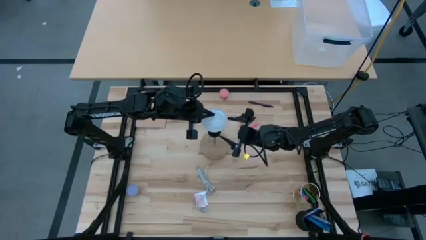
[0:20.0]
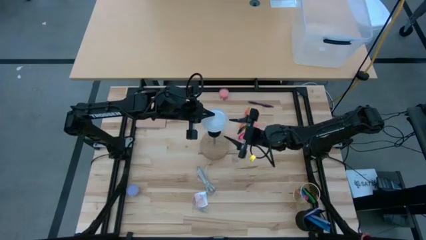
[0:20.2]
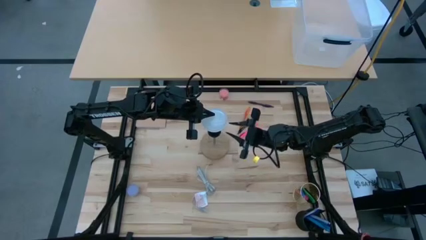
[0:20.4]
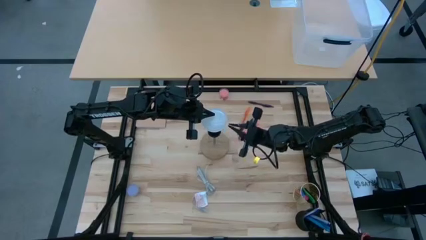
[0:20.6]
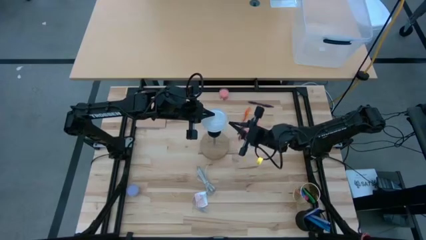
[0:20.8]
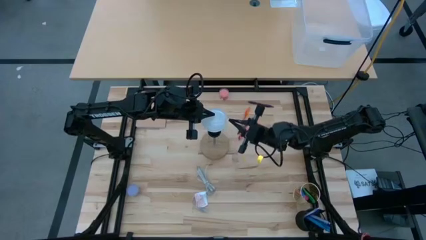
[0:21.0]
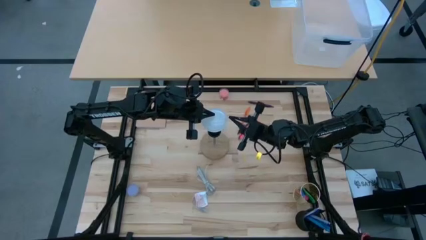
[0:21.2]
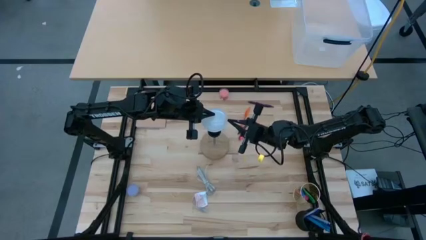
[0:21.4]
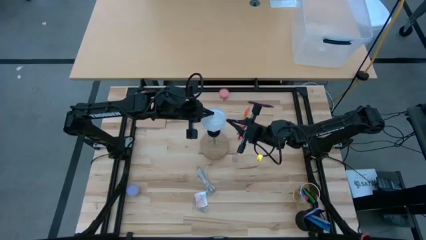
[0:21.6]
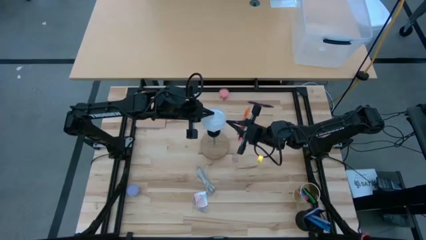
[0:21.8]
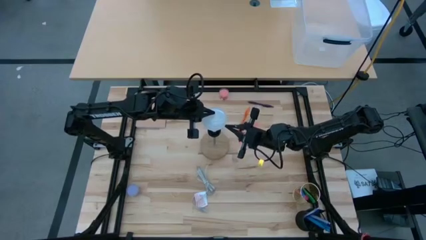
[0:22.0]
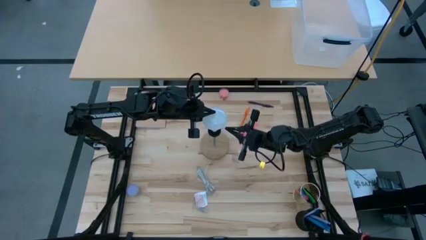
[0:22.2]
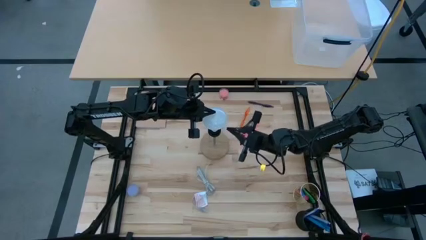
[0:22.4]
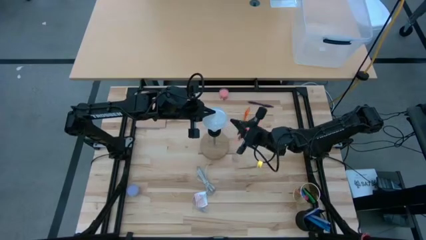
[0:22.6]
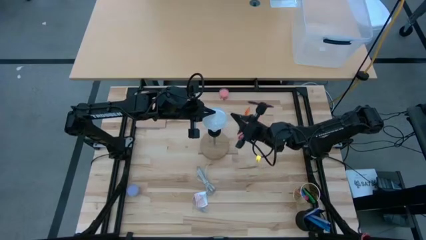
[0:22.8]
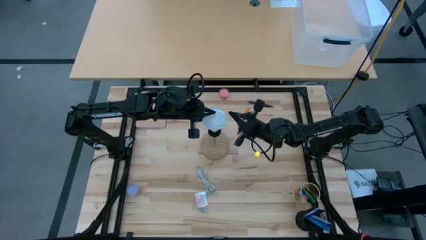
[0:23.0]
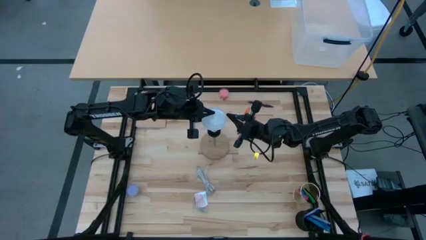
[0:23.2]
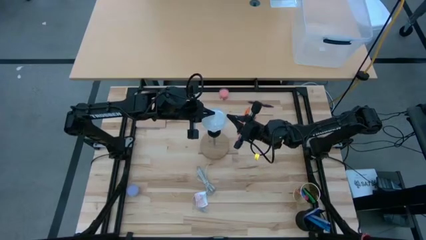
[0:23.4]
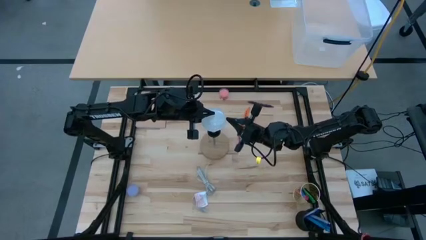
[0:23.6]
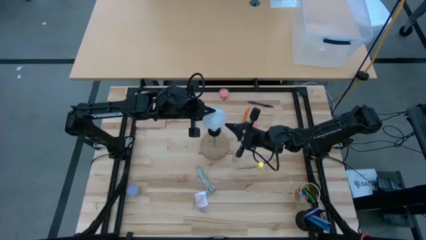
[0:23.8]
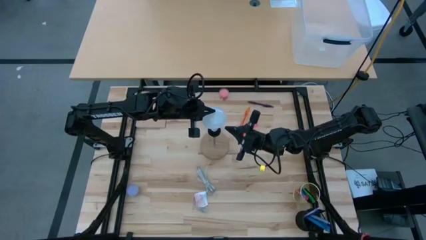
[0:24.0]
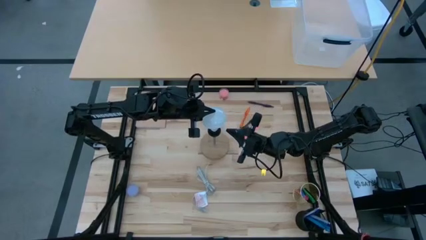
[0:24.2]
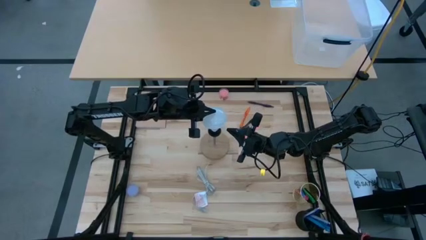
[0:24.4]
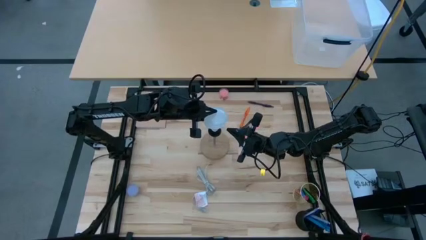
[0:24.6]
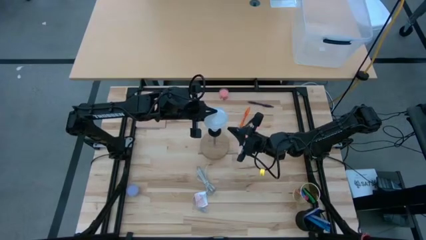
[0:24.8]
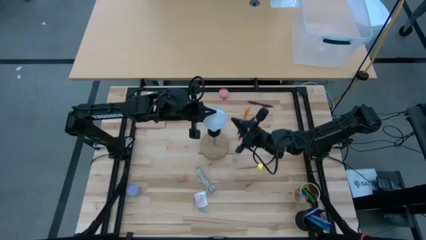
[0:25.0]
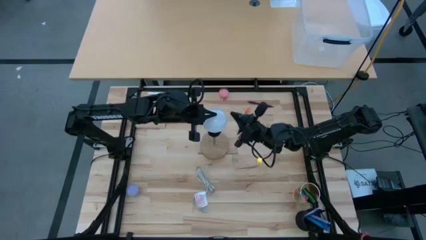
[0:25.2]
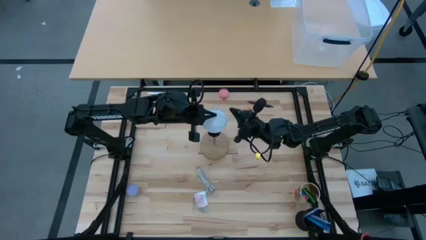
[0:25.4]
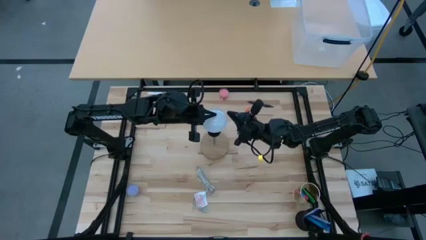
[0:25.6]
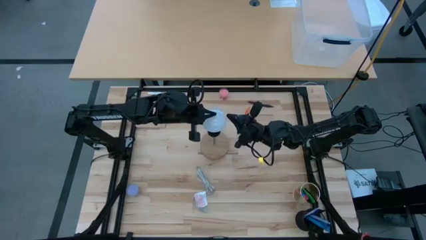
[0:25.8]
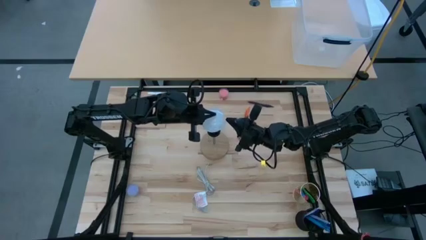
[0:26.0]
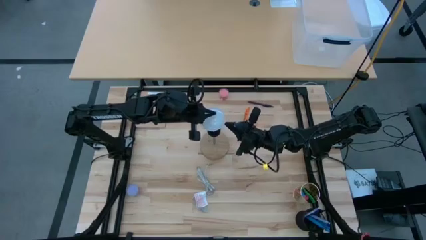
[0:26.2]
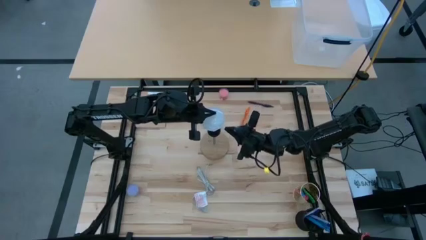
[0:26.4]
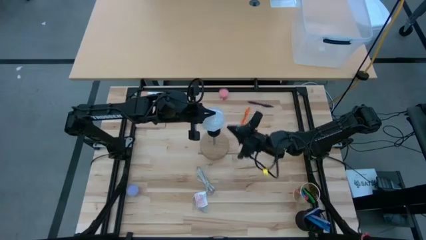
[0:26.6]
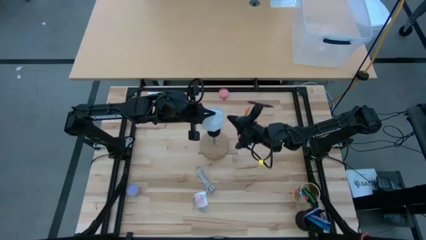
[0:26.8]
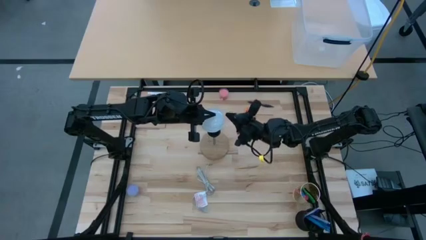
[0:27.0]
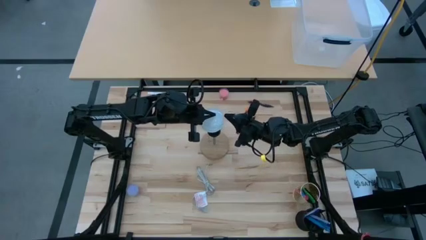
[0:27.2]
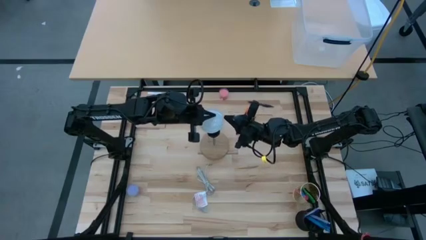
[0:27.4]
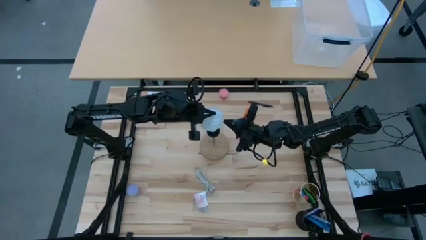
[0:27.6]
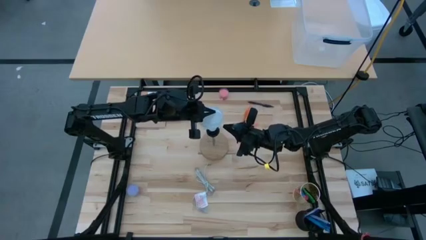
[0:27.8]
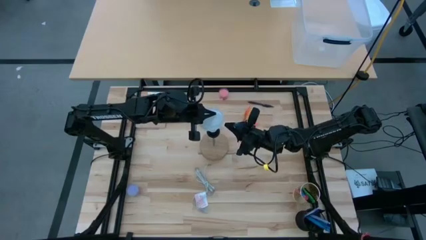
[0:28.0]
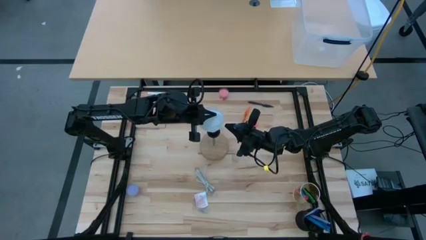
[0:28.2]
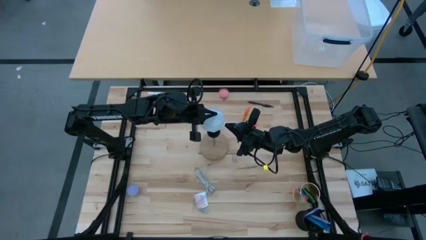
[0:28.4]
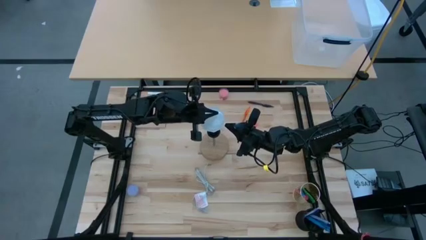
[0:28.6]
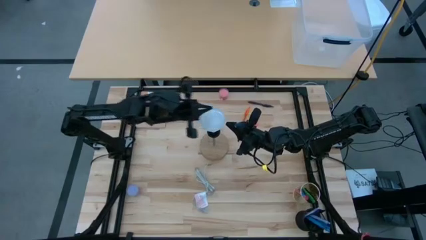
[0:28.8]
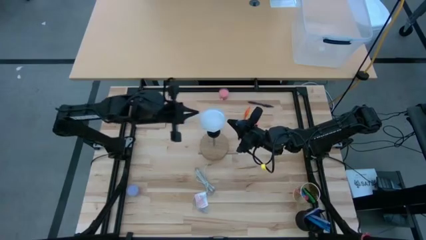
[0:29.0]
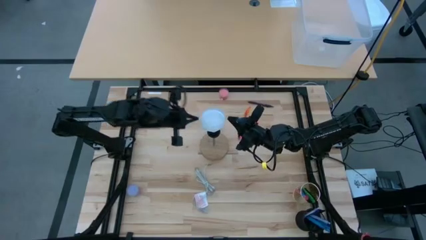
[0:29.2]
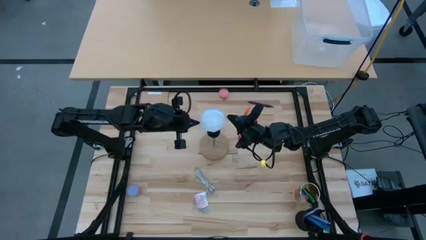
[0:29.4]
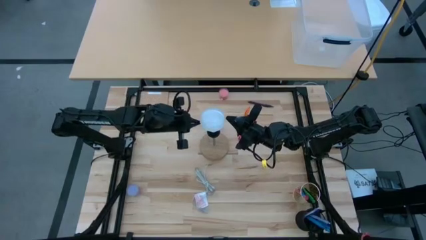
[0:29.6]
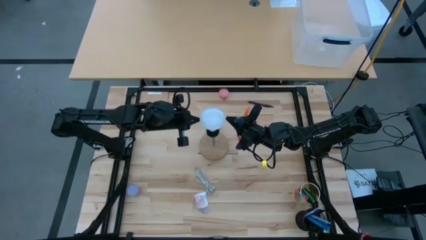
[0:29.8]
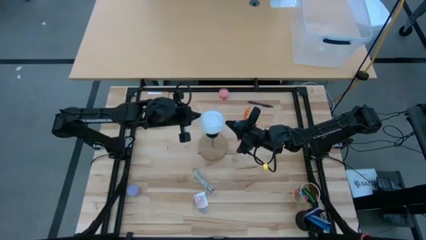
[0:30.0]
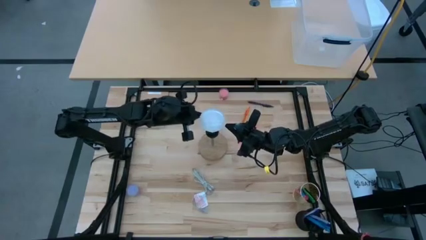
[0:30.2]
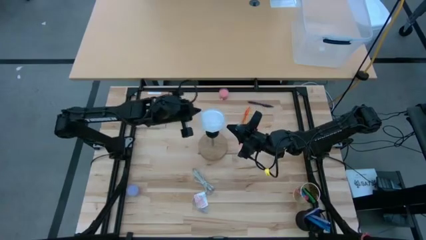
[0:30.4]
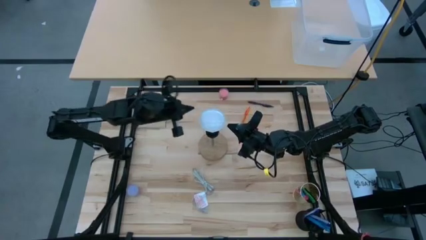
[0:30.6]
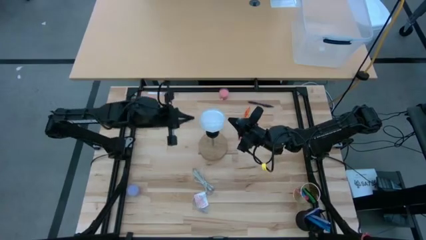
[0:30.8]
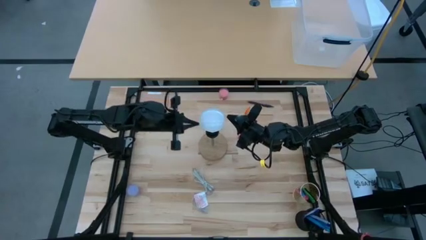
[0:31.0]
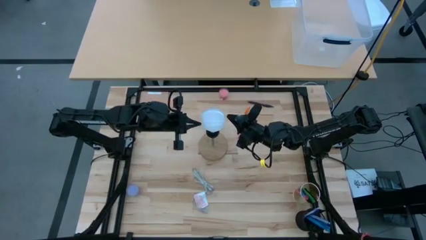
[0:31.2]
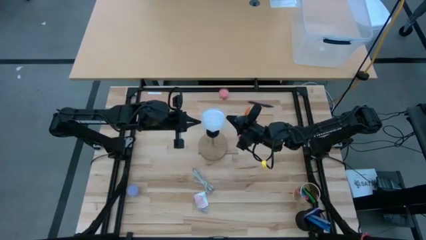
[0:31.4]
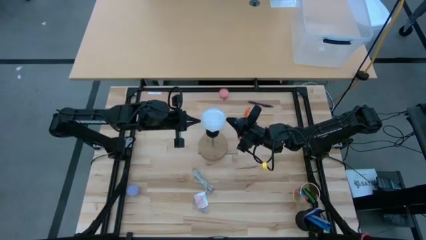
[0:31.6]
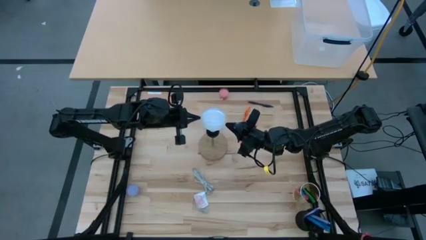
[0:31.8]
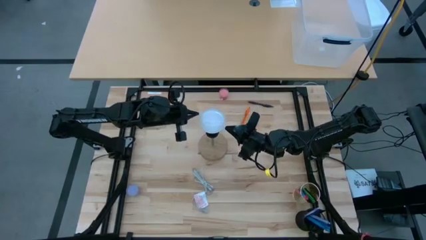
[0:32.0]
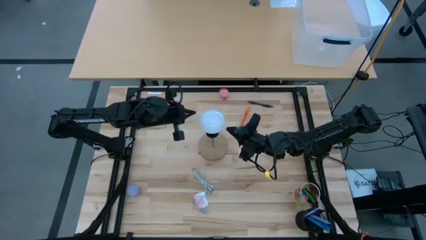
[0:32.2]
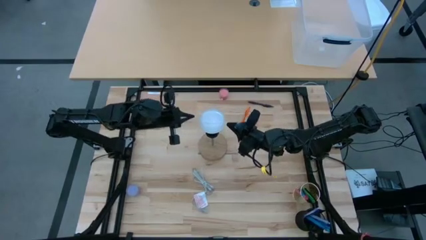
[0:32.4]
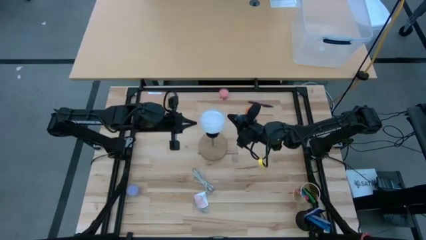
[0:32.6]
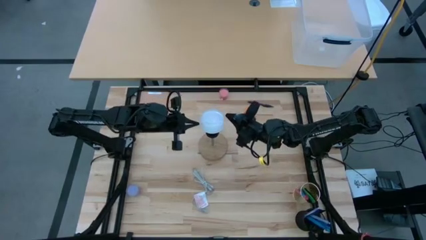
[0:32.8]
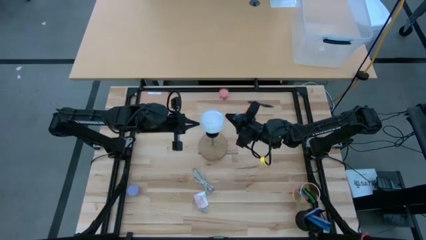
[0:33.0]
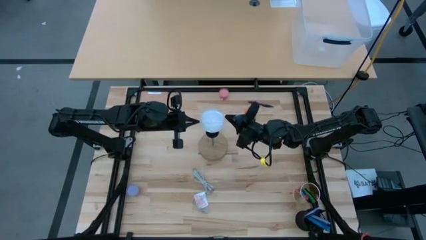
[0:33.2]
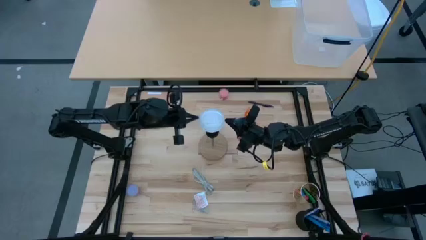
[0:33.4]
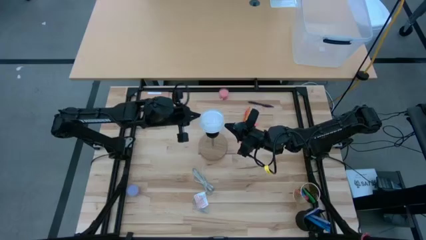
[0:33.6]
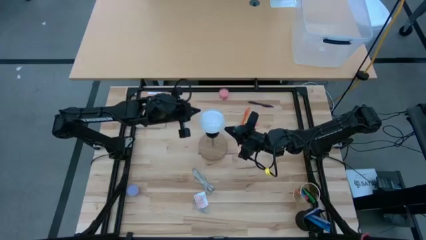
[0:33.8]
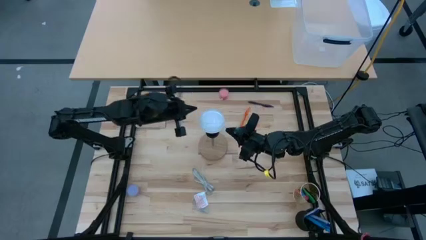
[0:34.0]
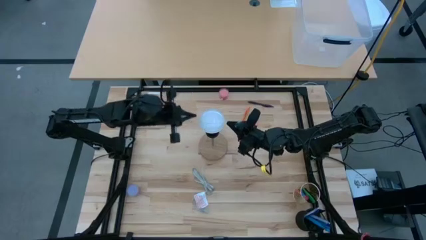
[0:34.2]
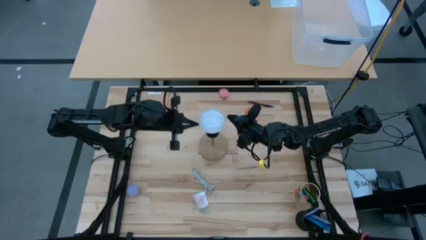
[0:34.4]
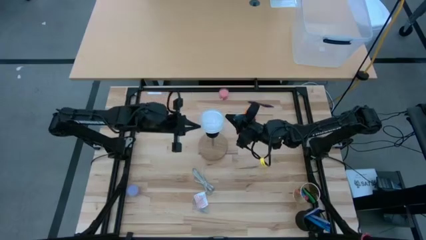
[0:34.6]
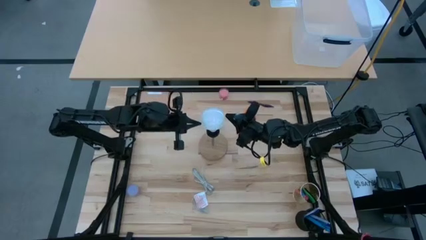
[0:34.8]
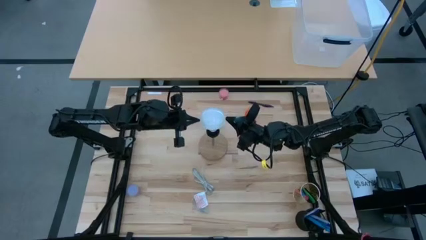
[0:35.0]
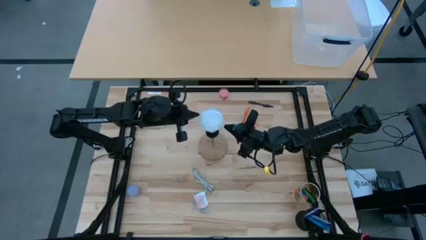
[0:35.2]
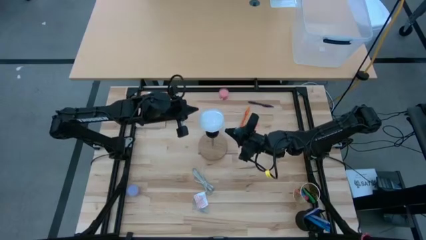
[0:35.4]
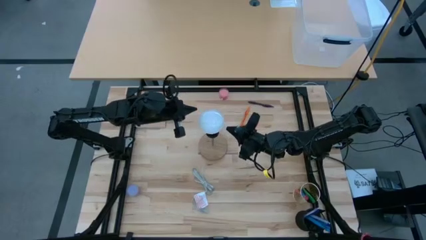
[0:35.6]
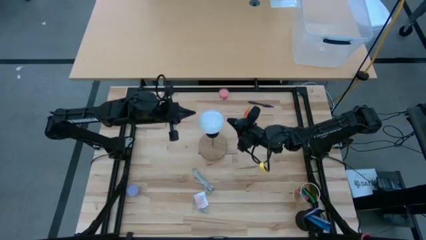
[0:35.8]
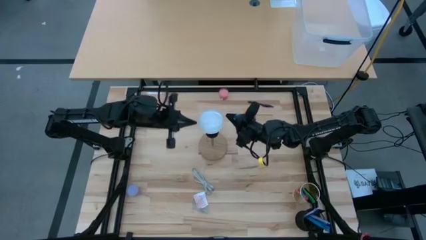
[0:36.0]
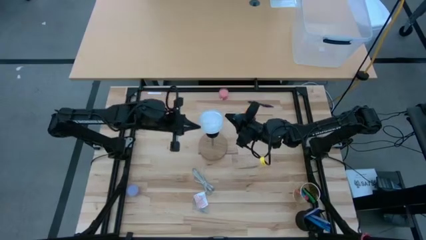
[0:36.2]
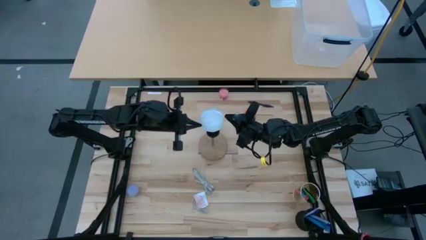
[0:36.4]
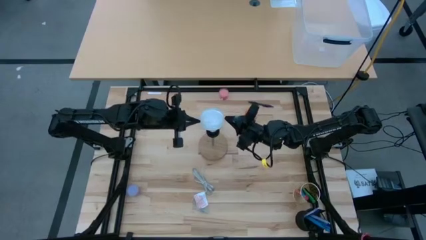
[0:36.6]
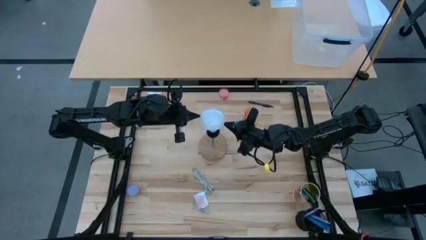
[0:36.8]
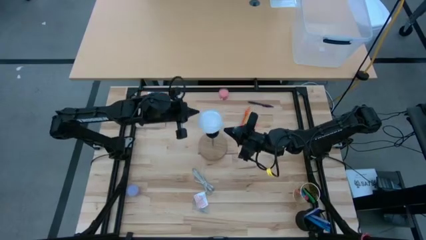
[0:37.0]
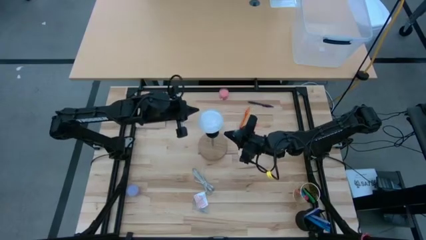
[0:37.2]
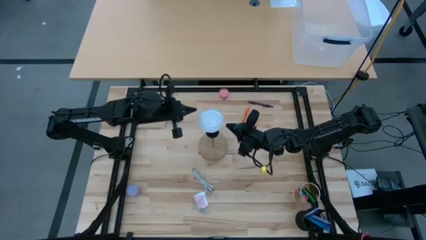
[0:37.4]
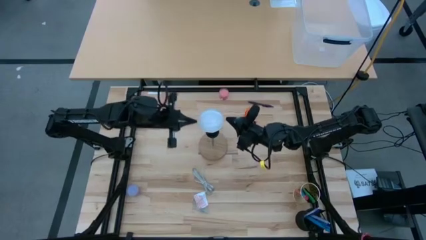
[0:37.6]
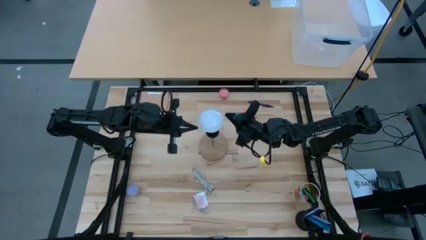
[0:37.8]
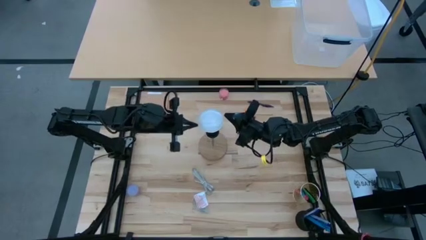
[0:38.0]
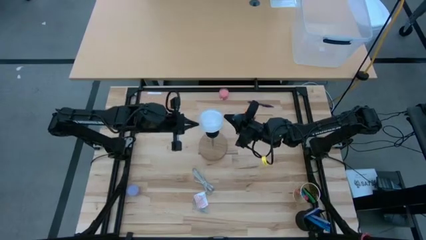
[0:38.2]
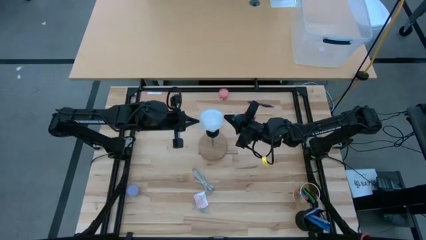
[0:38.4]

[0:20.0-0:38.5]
Task: Screw lightbulb
Insert the white lightbulb into the desk lamp
